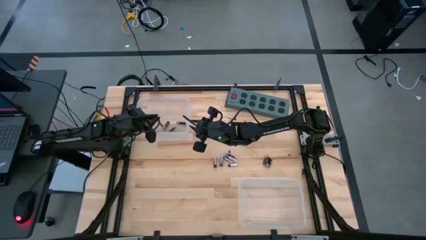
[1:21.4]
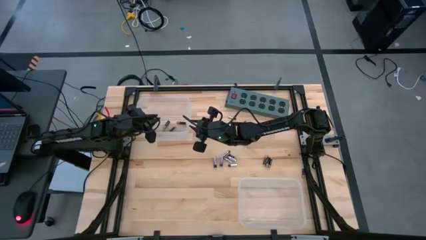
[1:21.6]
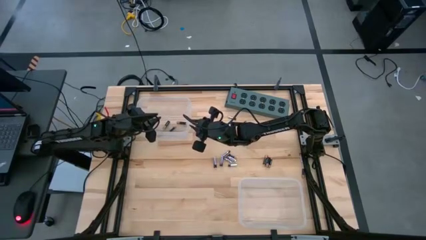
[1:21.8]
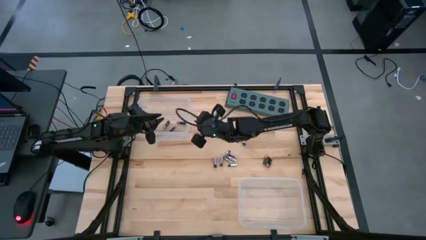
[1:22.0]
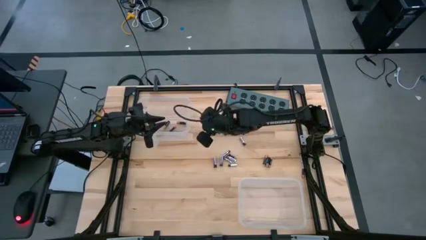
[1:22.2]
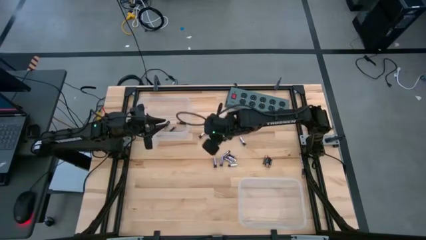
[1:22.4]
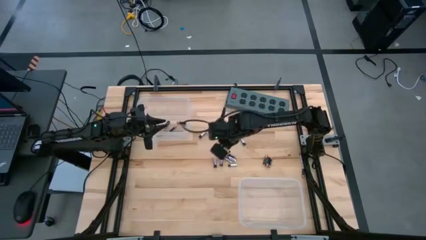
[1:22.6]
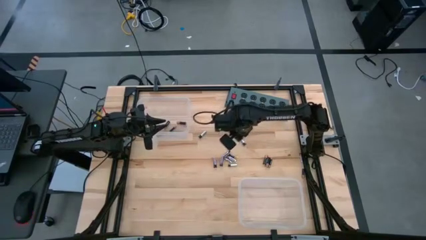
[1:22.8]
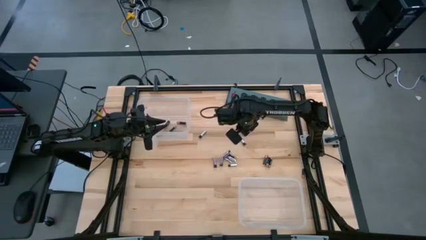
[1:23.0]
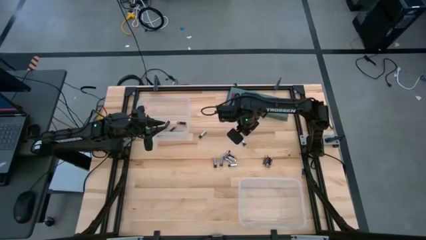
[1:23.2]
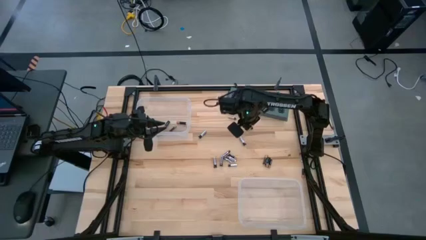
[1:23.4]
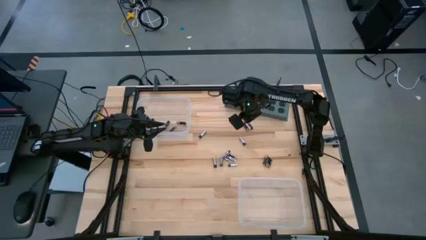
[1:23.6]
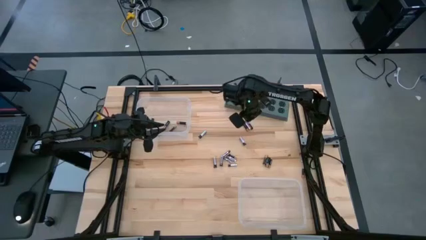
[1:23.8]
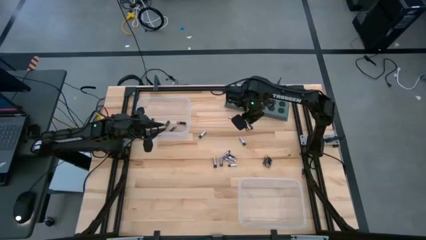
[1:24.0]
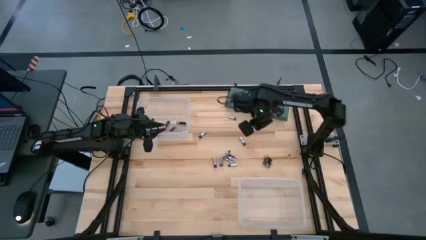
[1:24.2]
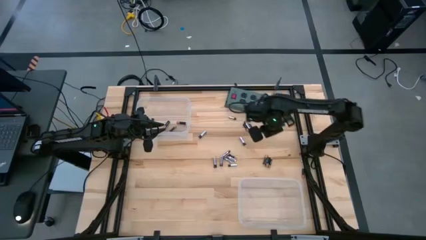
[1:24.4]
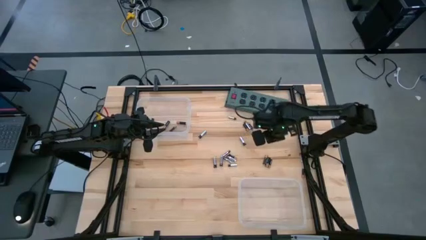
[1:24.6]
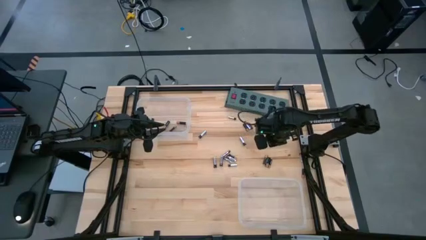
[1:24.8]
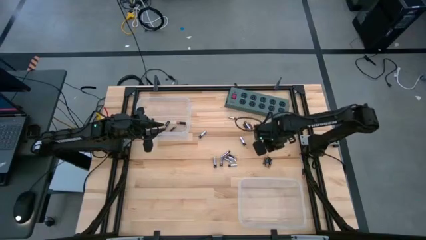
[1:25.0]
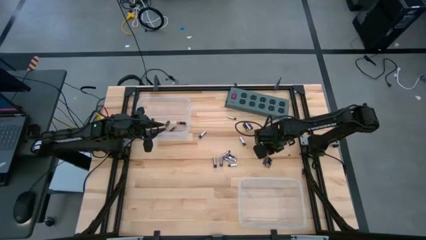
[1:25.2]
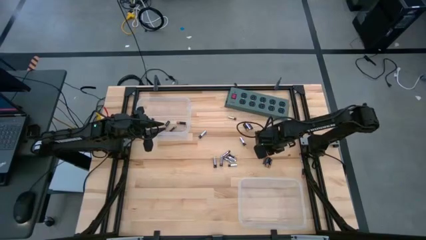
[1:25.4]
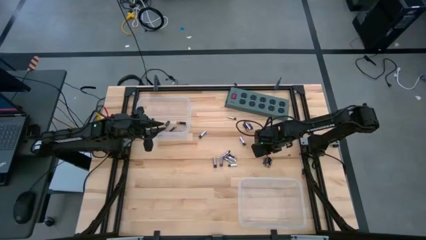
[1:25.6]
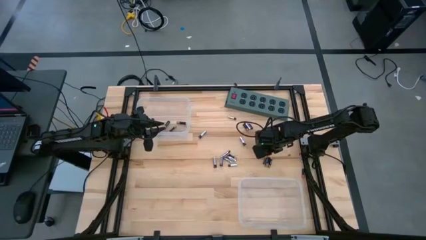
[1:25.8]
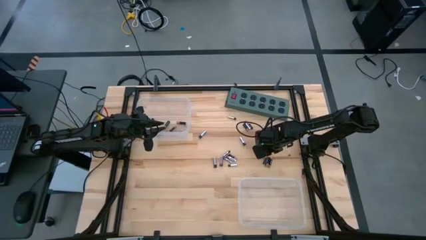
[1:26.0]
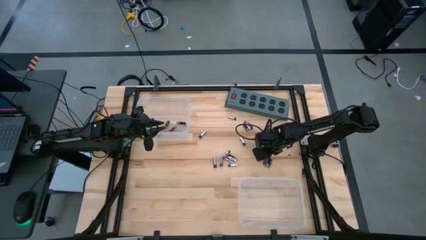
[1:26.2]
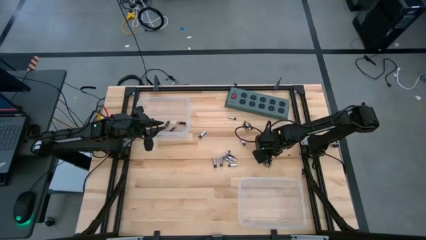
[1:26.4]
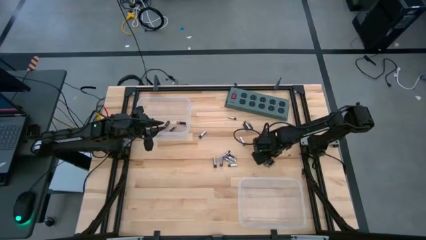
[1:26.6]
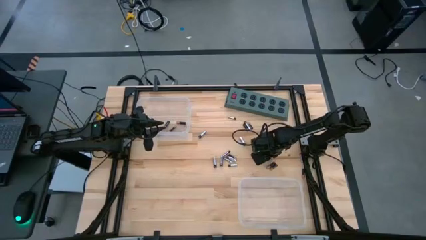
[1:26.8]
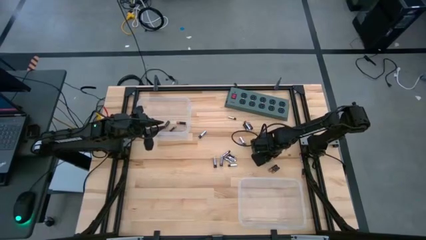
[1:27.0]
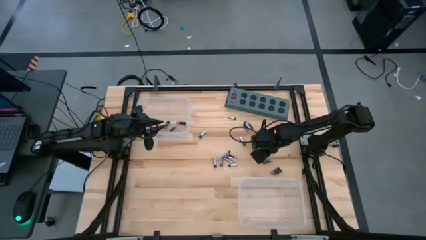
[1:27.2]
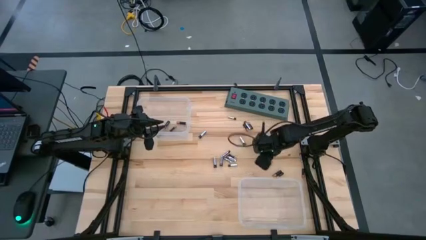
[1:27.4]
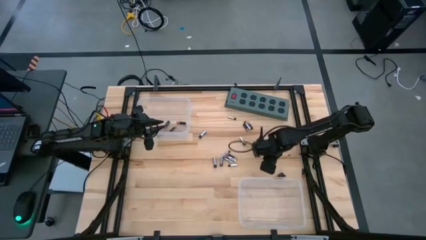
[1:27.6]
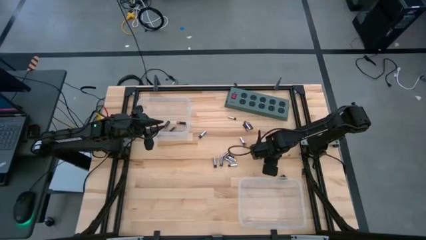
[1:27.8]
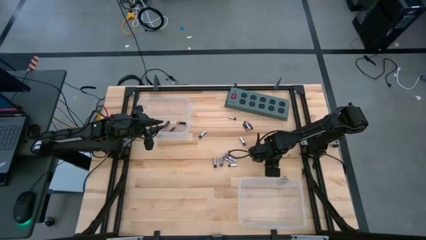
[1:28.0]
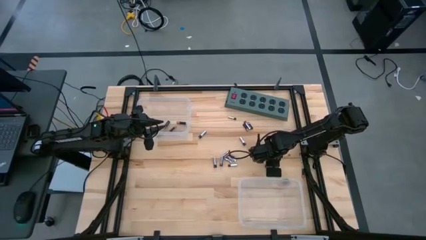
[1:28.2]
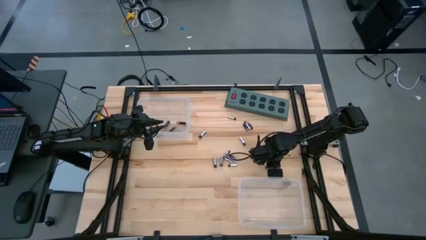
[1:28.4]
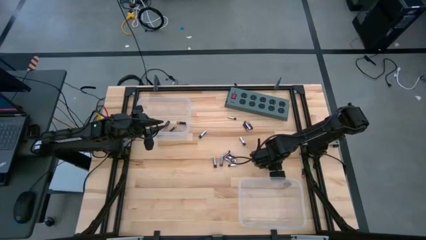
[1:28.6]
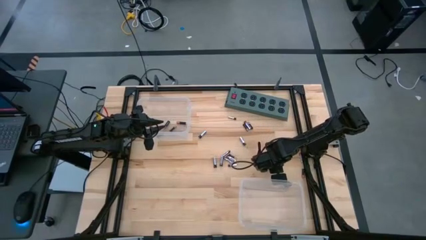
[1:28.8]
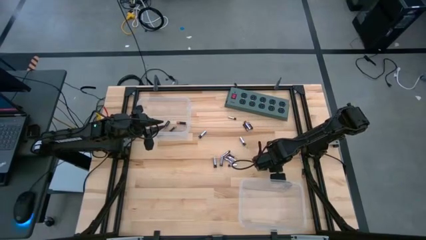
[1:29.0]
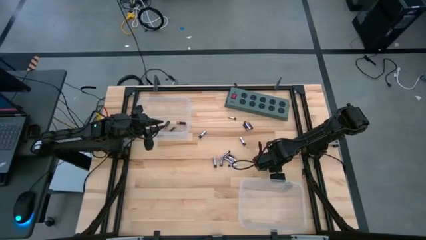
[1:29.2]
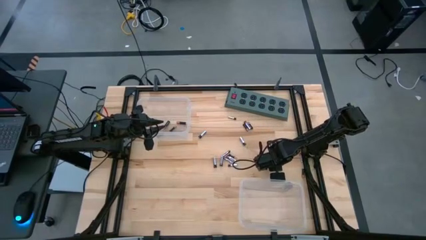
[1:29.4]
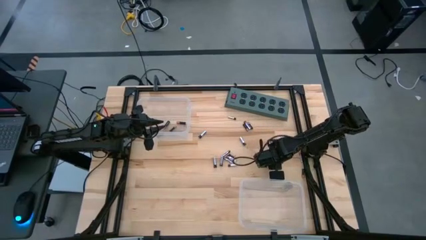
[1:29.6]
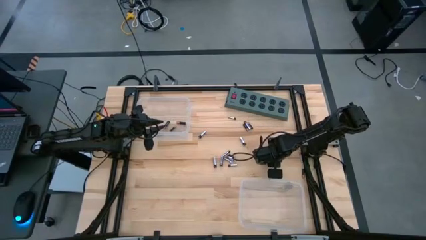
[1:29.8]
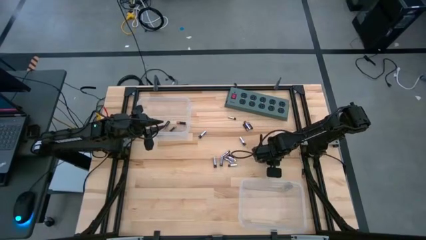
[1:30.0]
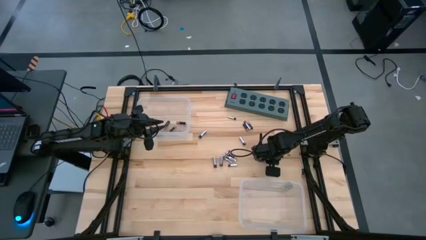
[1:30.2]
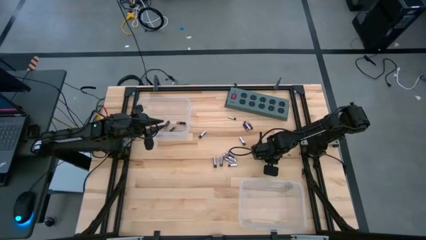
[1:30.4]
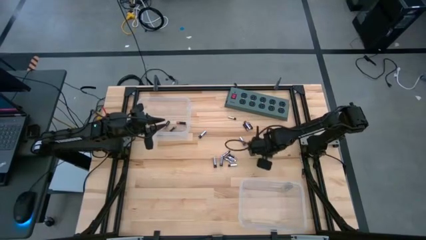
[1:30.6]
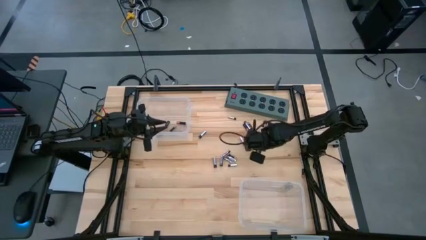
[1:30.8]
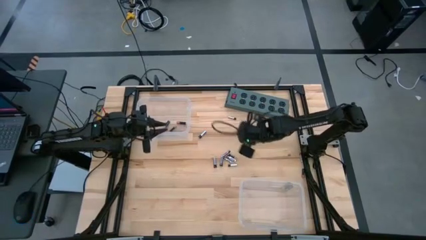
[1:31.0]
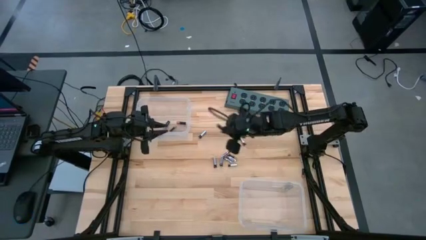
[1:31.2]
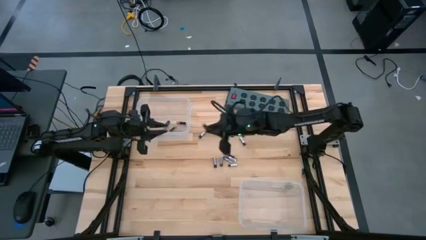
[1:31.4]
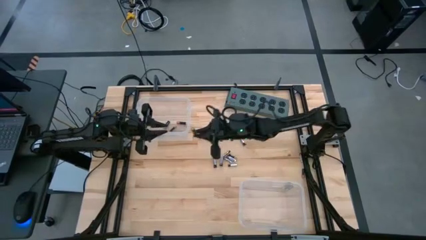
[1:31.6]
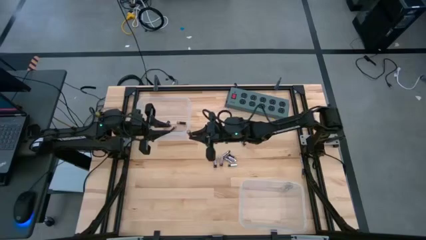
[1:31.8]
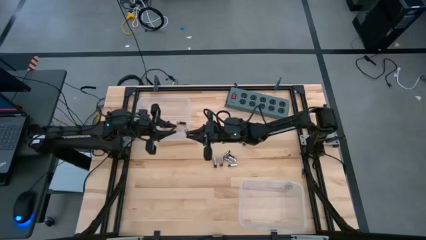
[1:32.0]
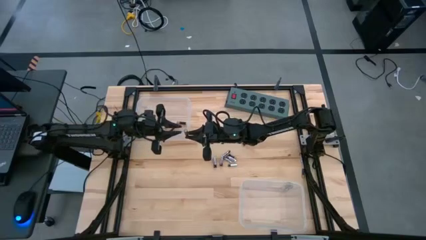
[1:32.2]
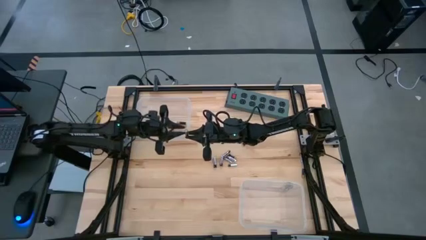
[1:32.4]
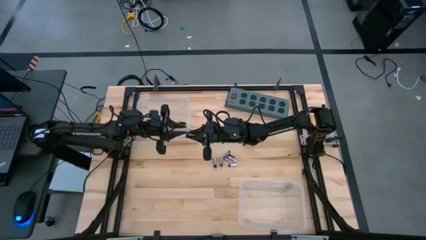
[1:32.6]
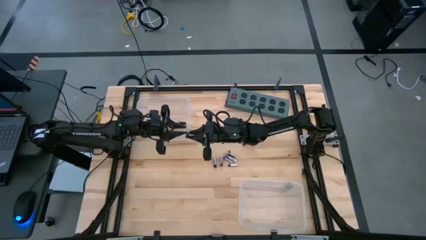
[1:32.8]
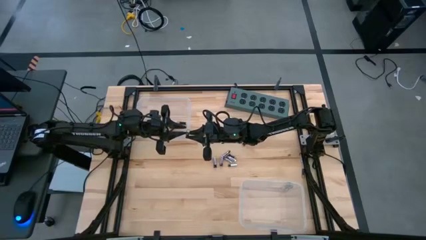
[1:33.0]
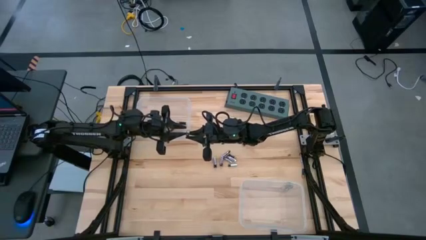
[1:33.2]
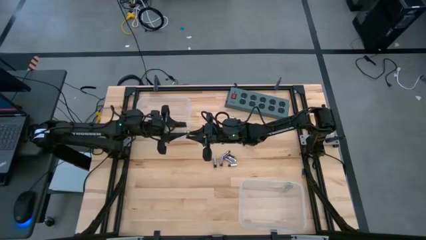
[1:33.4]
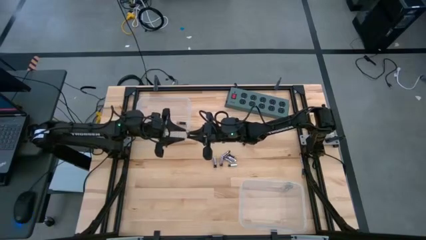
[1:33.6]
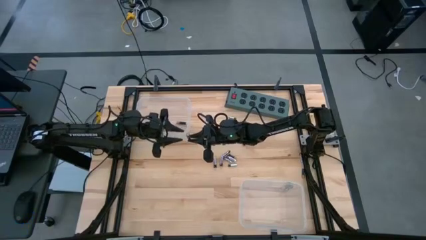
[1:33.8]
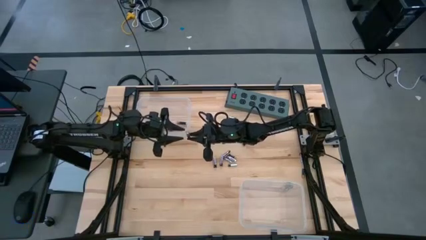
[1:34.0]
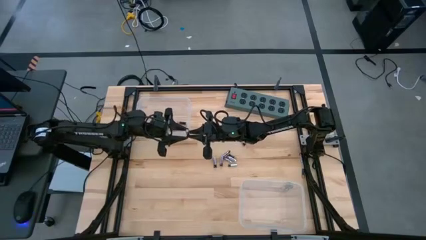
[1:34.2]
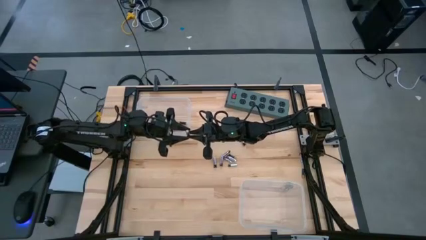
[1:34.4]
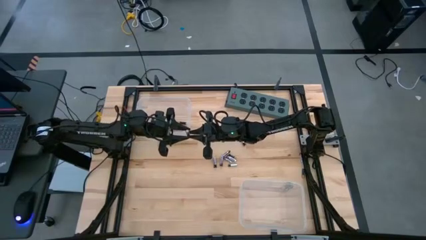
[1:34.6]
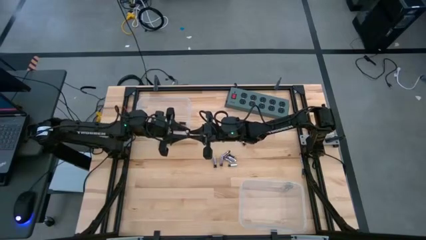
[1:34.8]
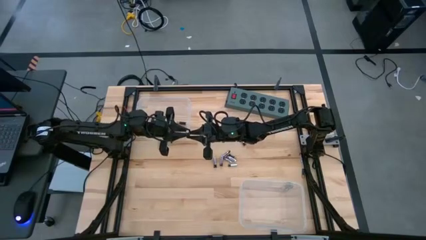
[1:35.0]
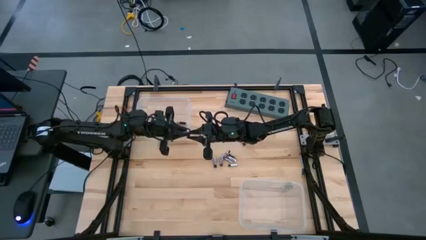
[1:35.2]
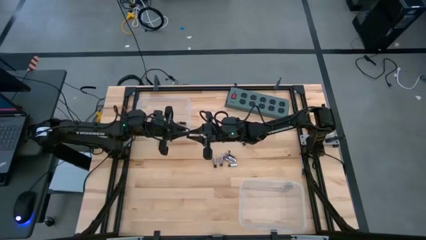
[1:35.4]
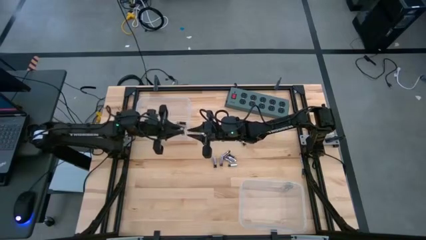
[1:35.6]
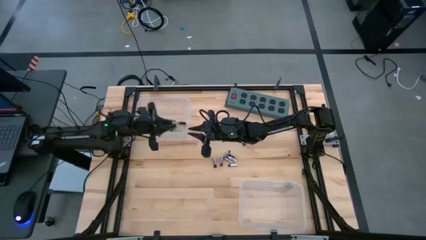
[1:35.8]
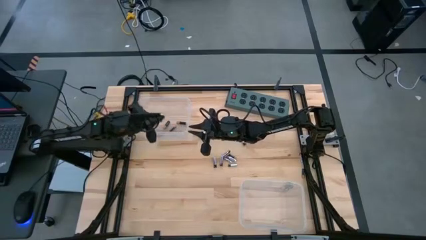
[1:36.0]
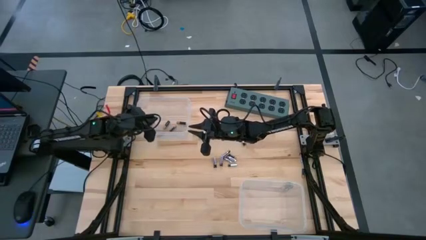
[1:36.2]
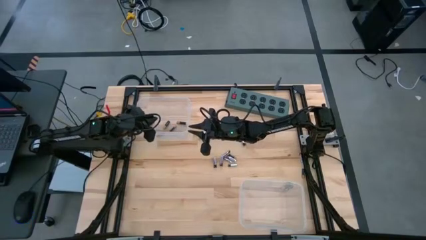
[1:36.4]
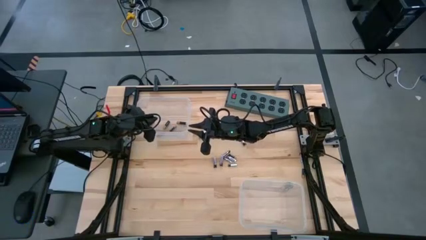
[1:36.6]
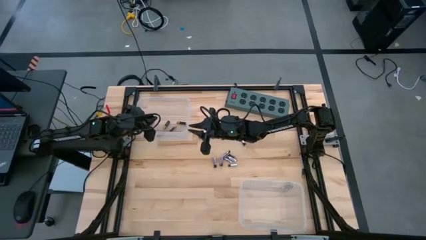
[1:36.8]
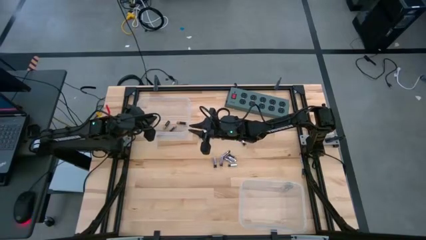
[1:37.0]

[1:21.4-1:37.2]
Task: Sort batteries
Put the black battery into the top transparent bin
